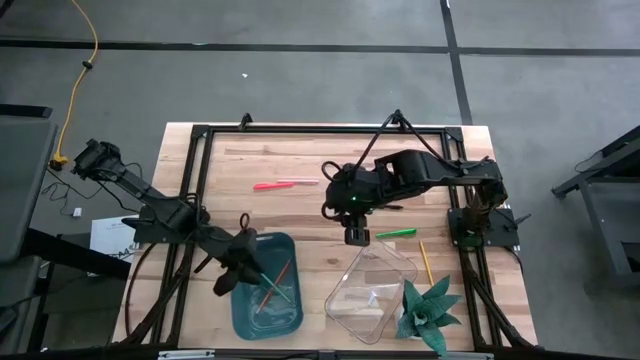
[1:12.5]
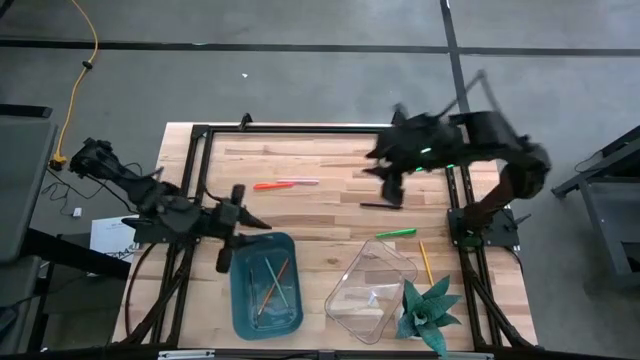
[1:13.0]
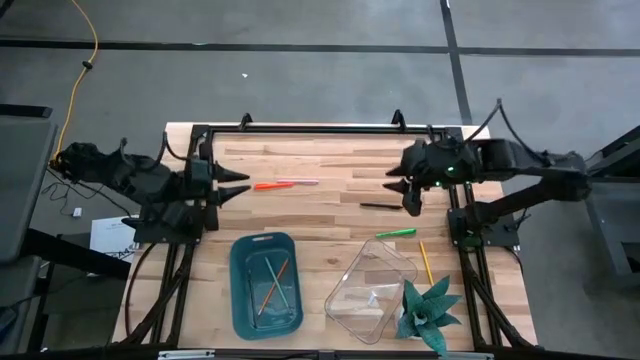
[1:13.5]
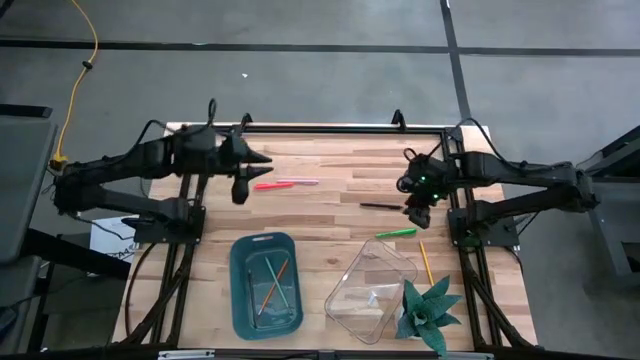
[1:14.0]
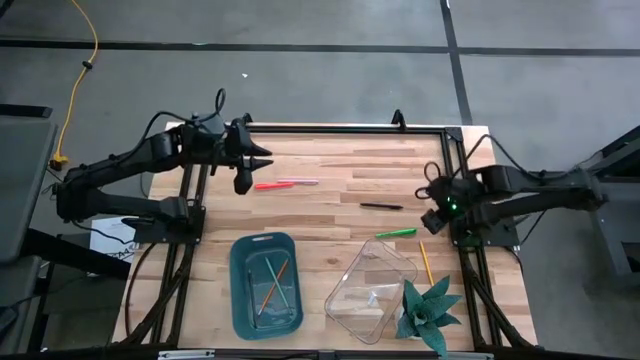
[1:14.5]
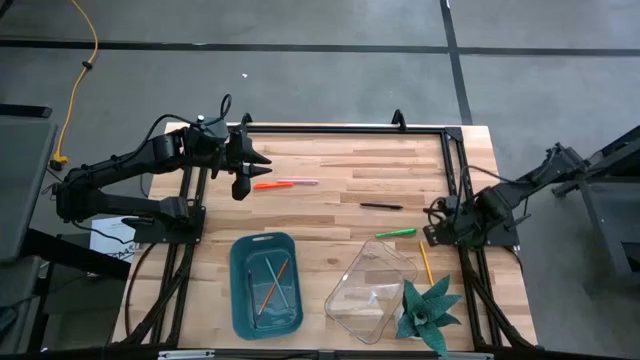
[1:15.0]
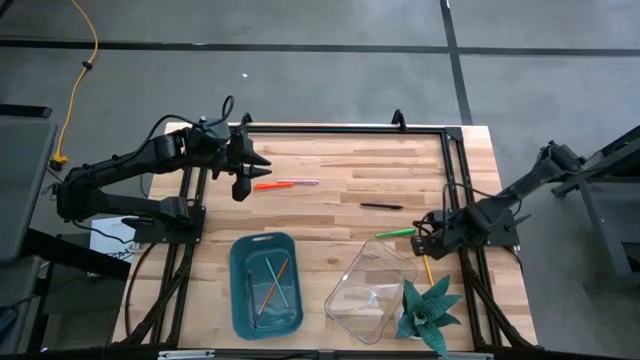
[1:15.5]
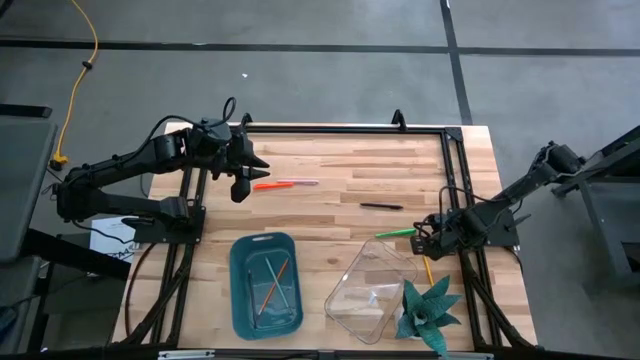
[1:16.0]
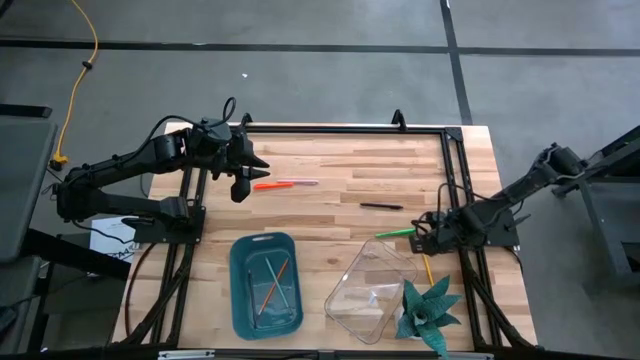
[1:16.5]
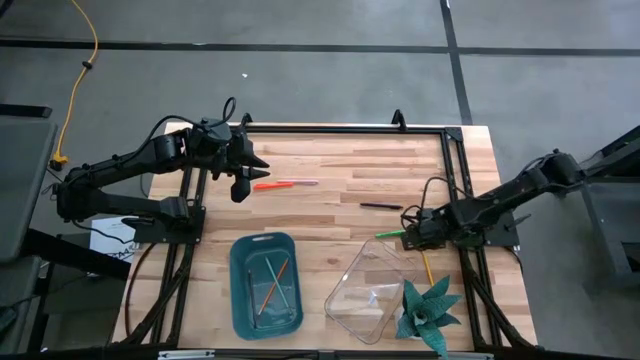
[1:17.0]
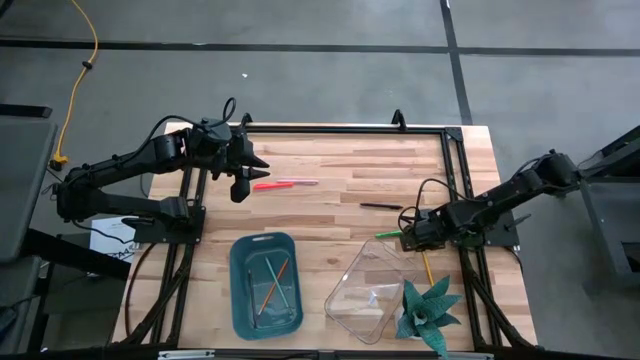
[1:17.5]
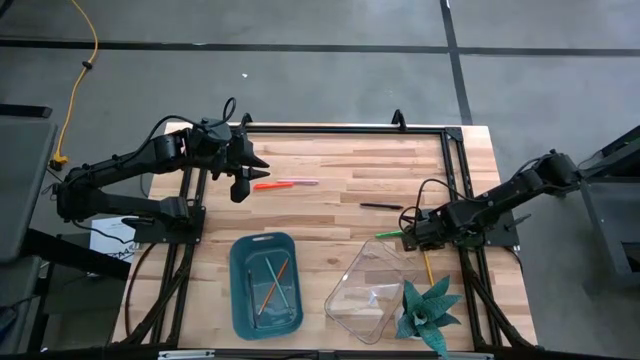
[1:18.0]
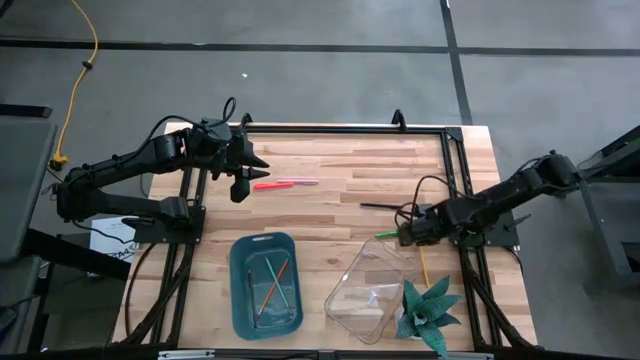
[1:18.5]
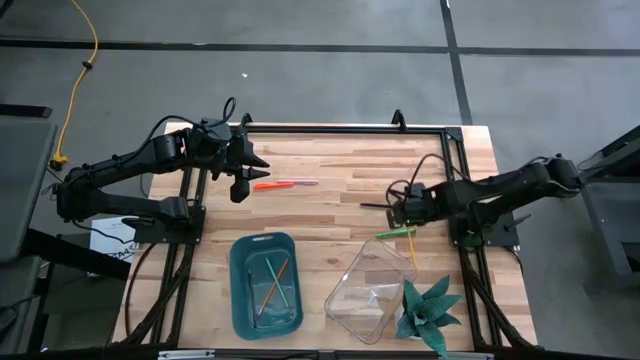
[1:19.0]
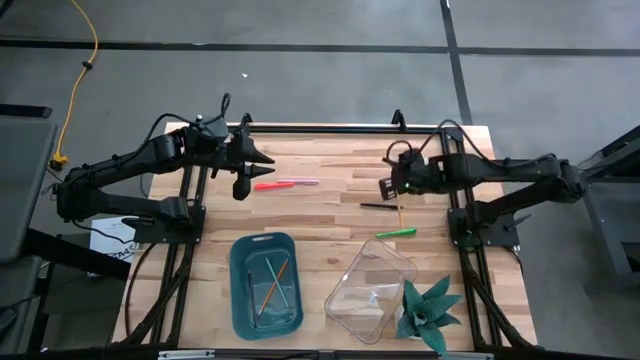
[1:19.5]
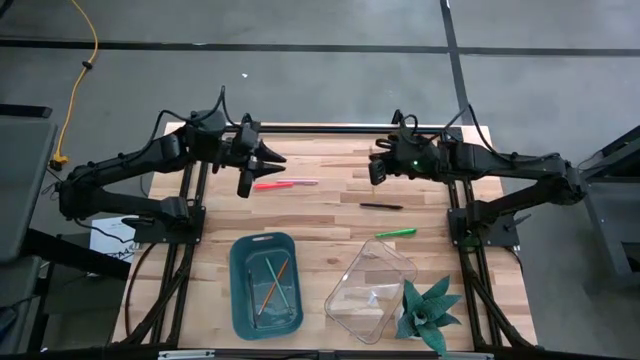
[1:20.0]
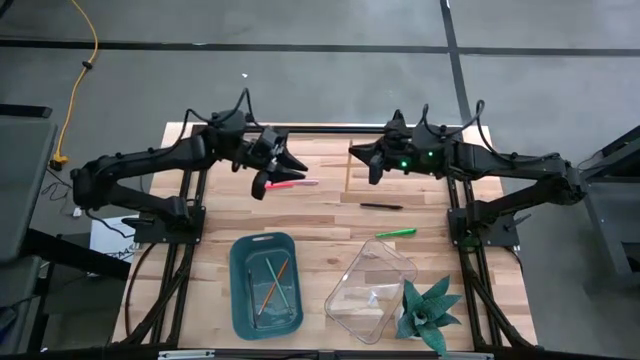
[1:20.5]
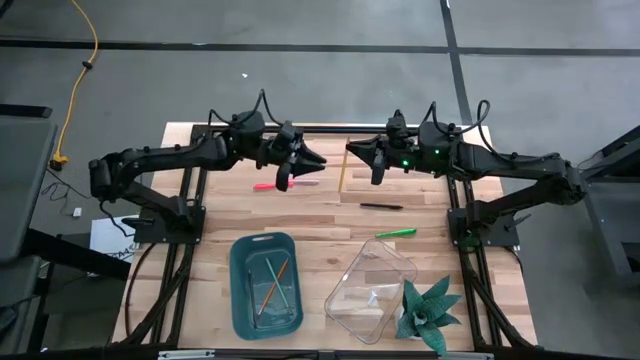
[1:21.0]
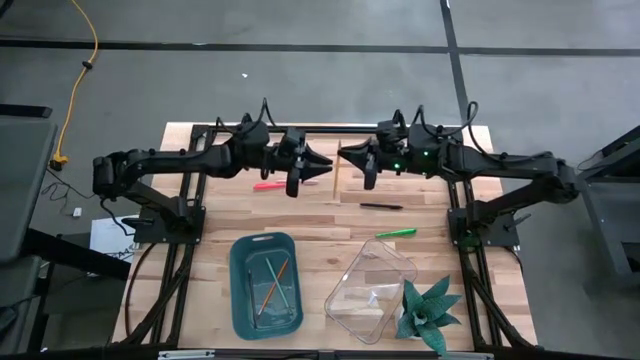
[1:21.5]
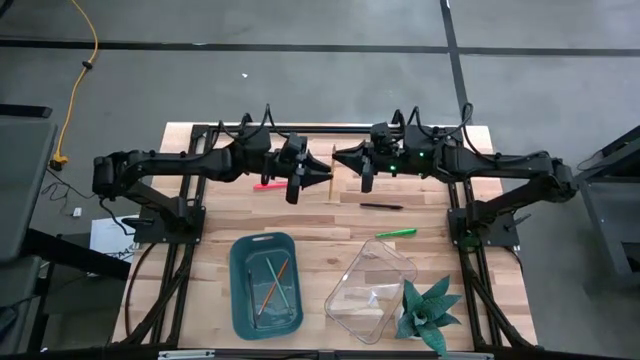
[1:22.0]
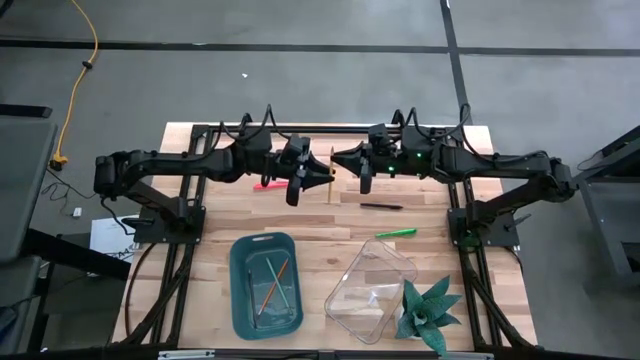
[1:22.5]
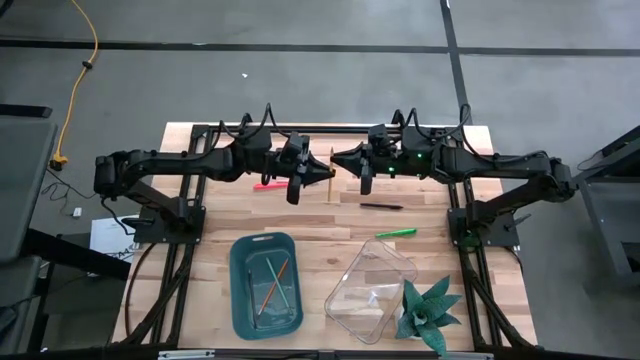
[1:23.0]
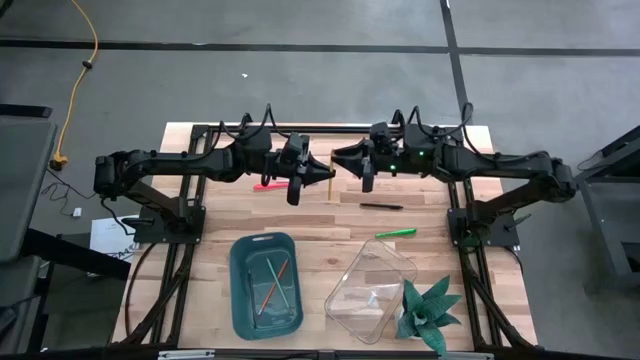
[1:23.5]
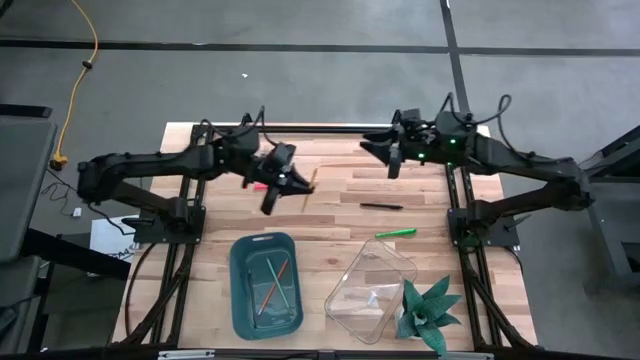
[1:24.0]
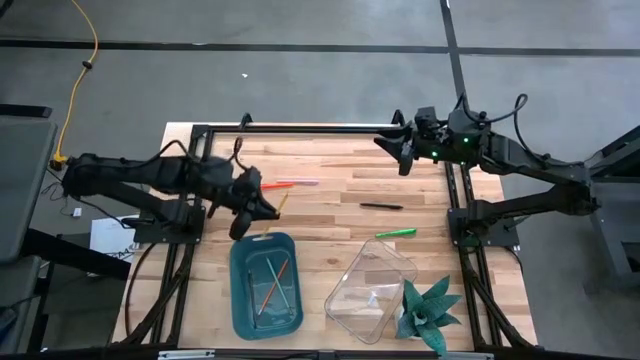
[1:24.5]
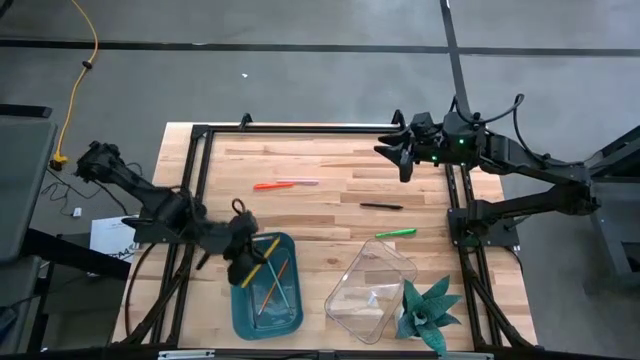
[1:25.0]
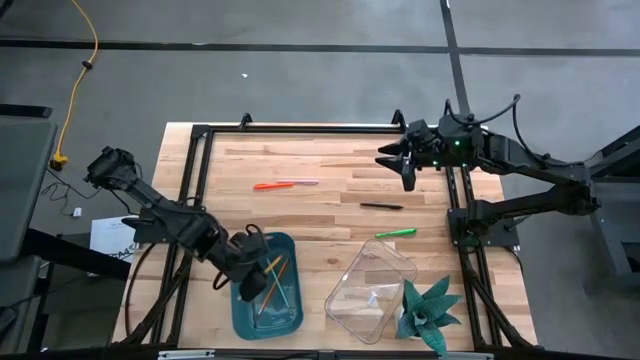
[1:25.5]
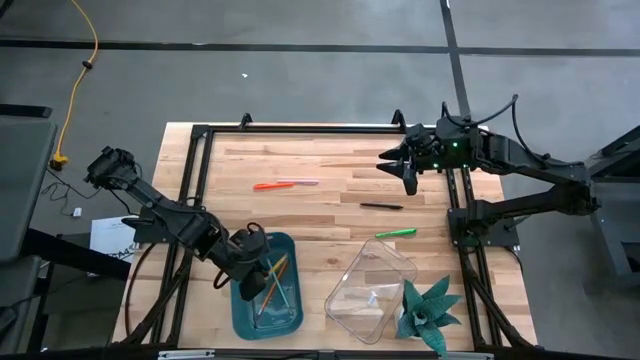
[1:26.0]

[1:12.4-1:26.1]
Task: Sort pens & pencils
Put the yellow pencil into the blue bin

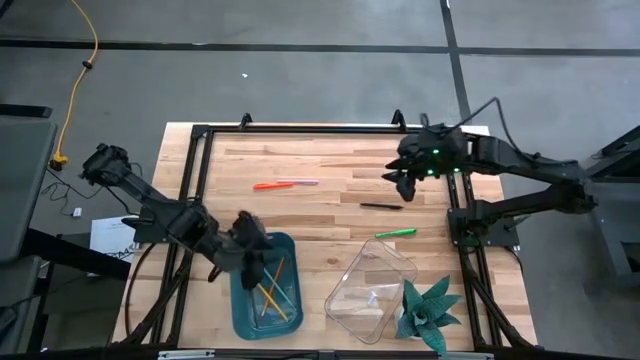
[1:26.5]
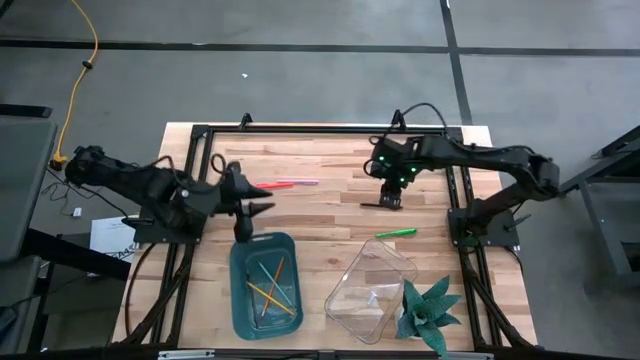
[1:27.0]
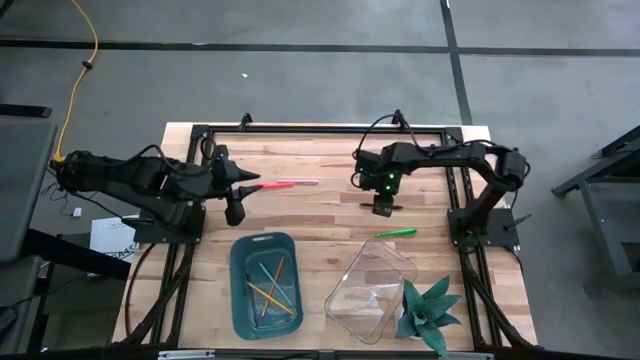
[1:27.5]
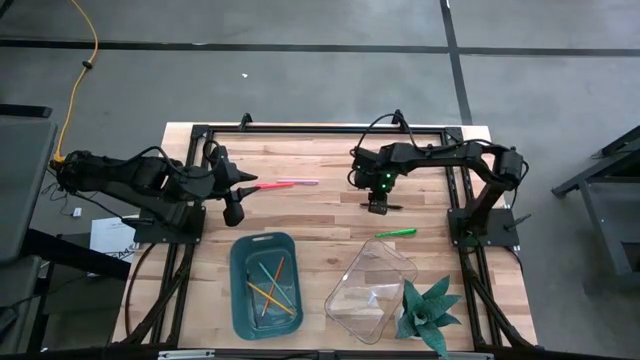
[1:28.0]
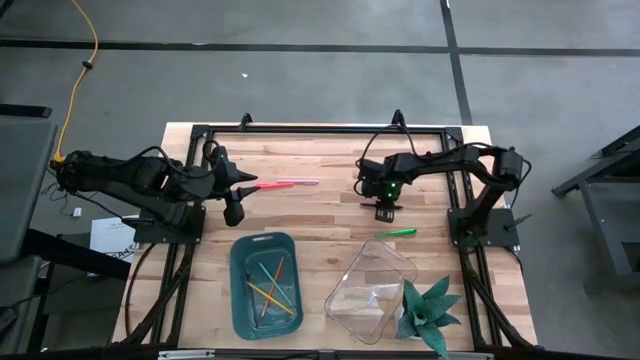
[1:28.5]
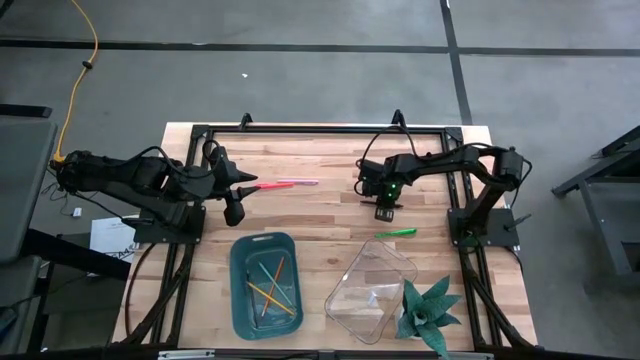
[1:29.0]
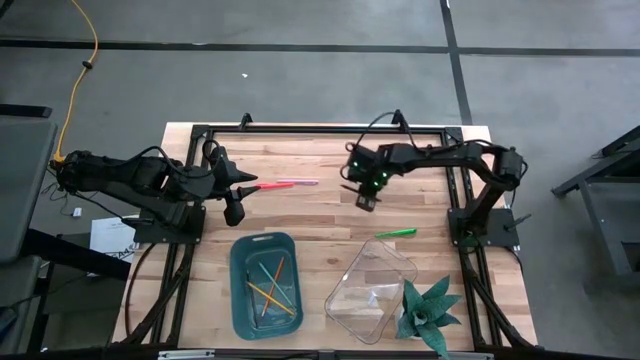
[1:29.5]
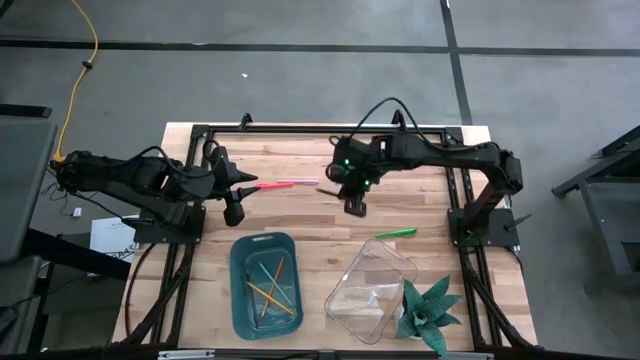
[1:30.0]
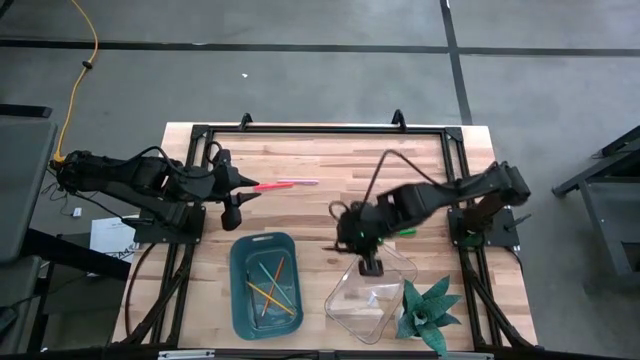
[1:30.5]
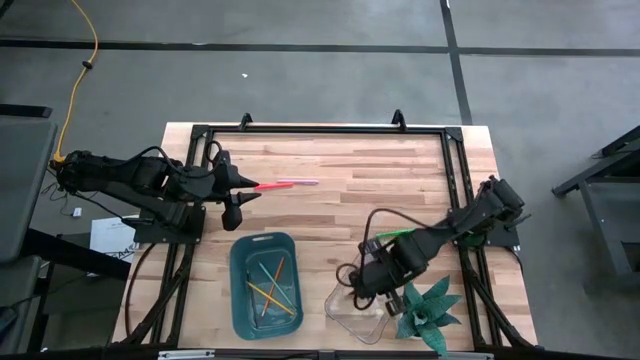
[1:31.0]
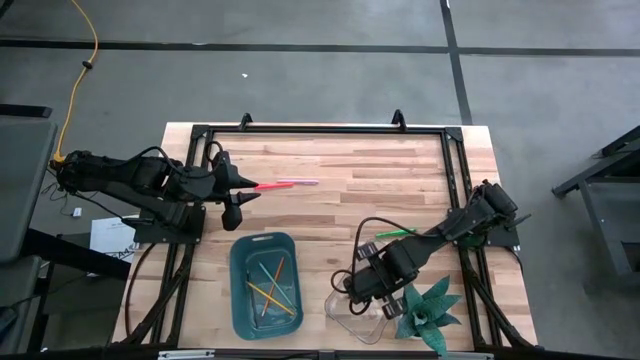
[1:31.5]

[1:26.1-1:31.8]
Put the black pen into the transparent bin

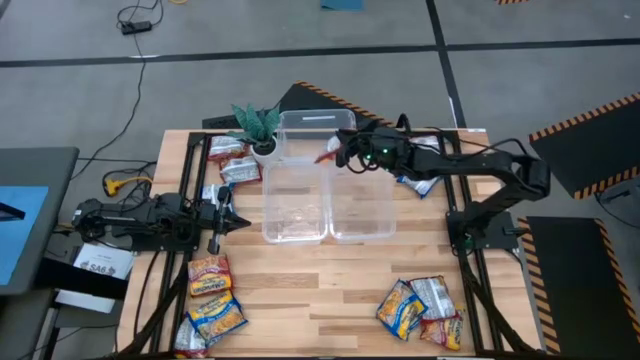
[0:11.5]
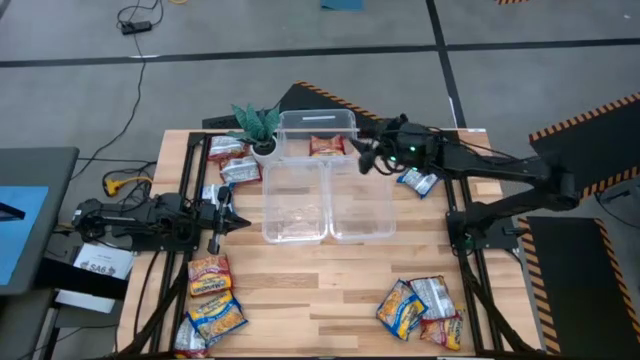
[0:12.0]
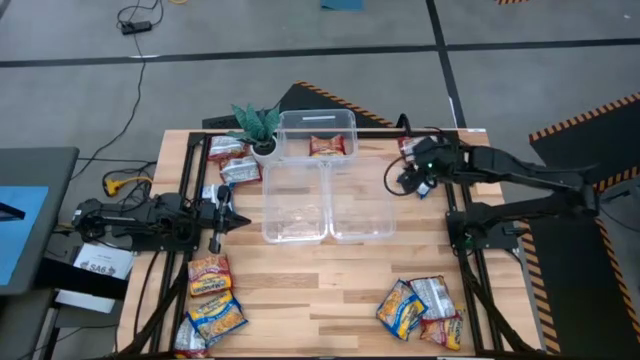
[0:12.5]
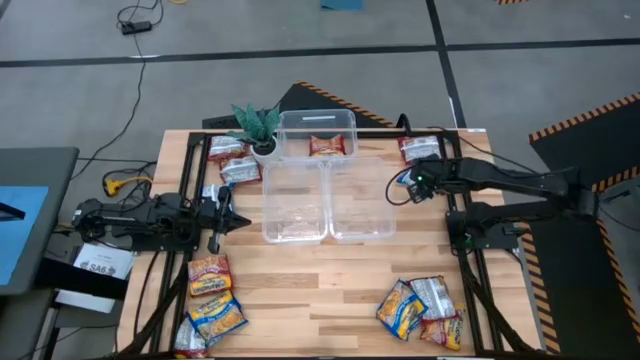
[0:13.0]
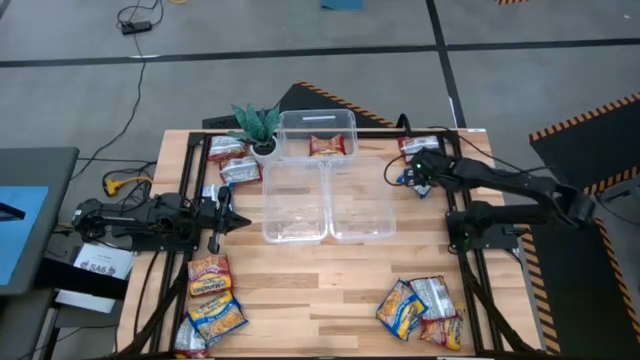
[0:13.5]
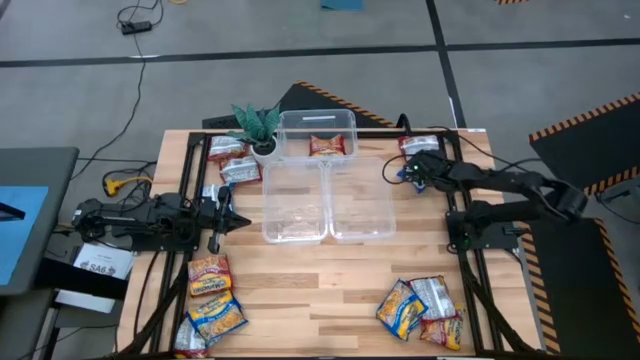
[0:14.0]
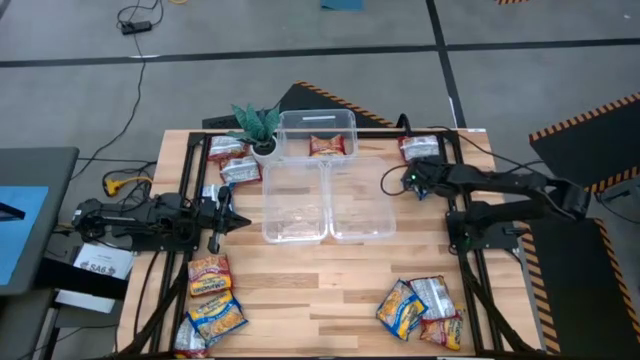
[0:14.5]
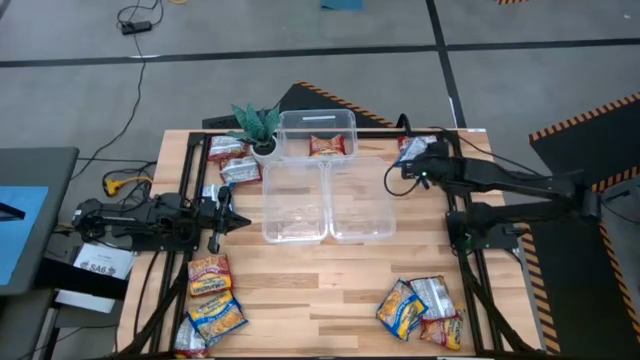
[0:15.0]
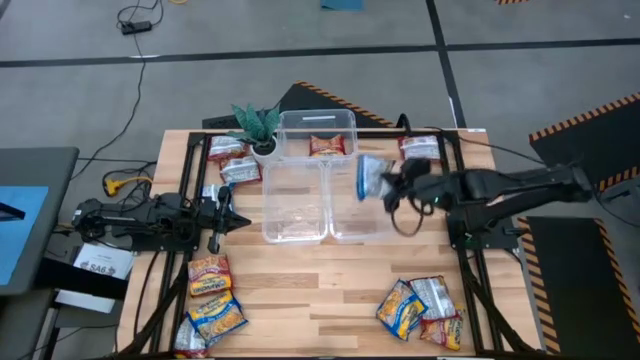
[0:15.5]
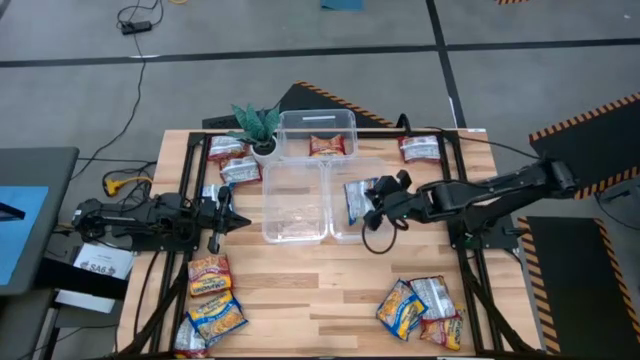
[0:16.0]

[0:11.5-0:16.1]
Task: Sort Maruchan noodles
Put the blue noodle pack into the bottom right transparent bin
